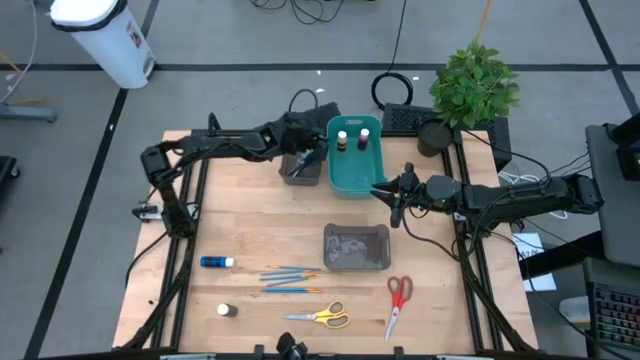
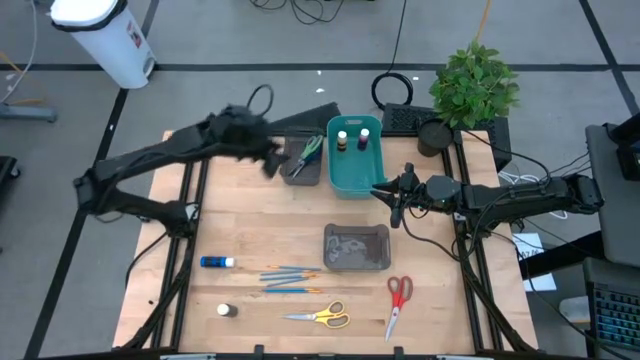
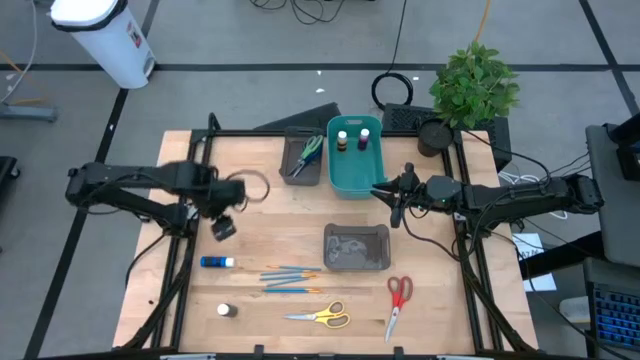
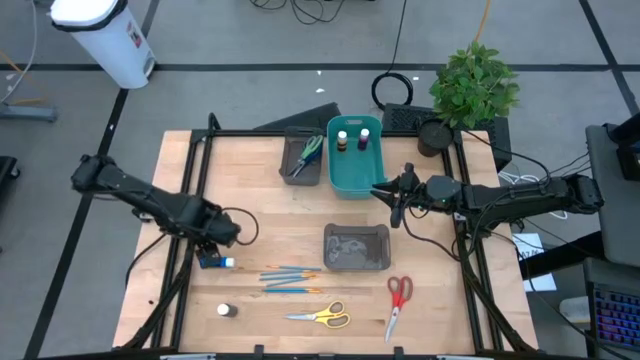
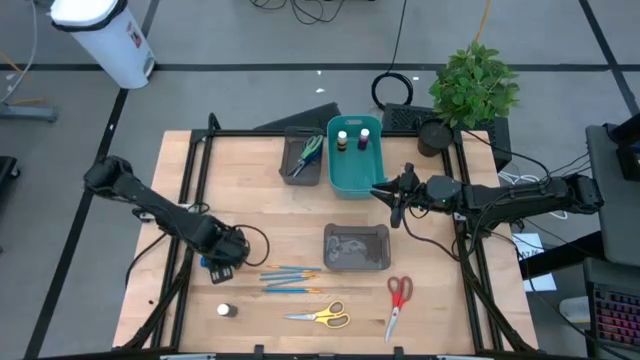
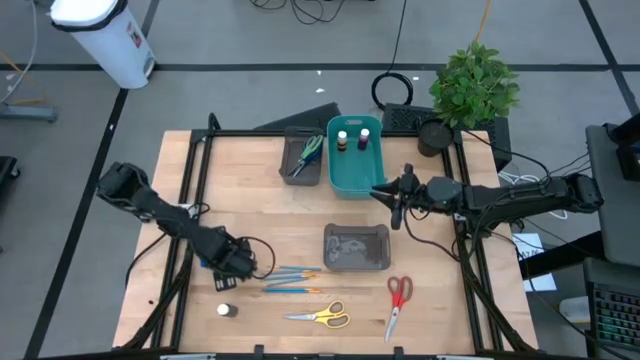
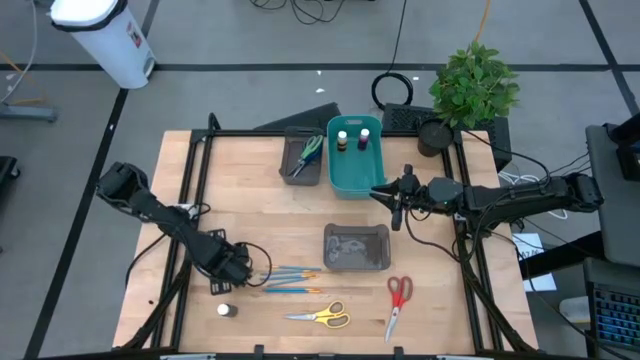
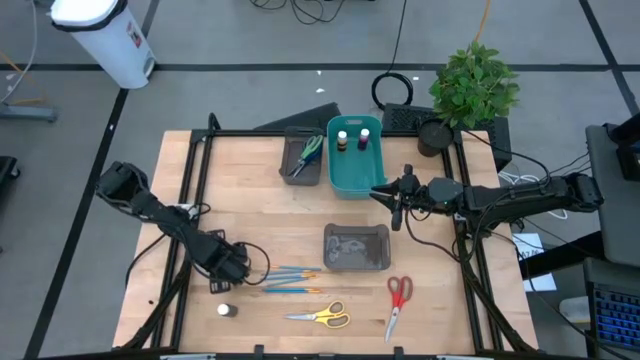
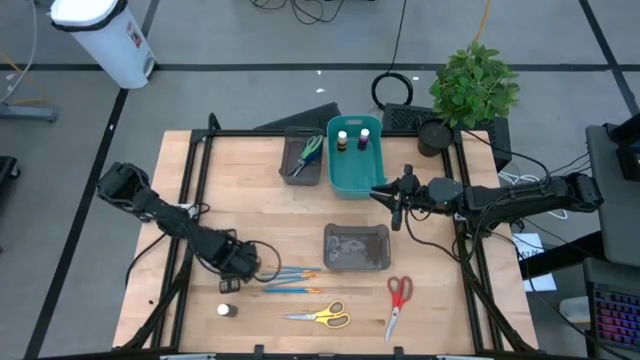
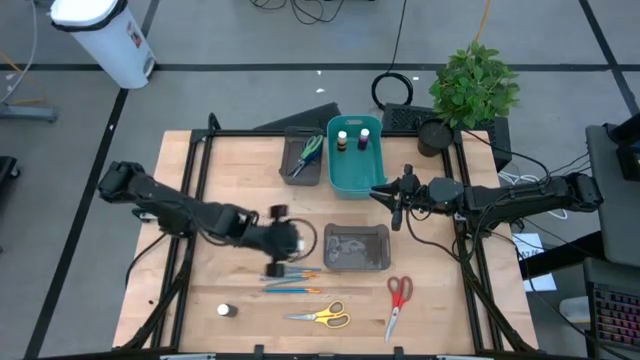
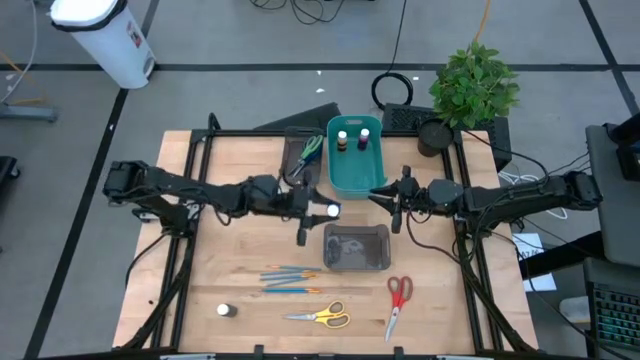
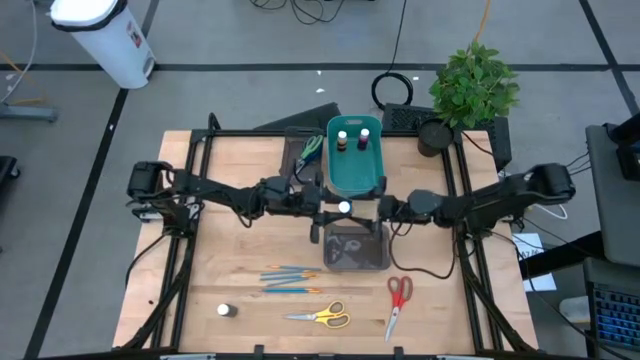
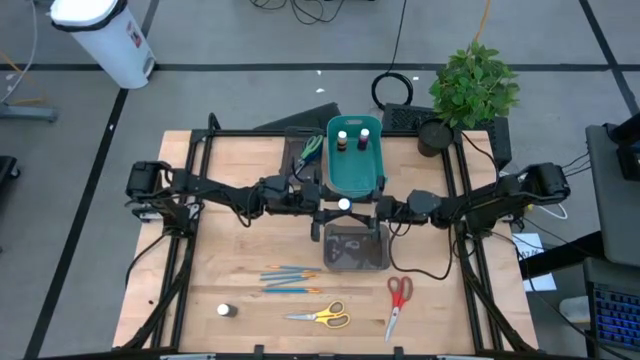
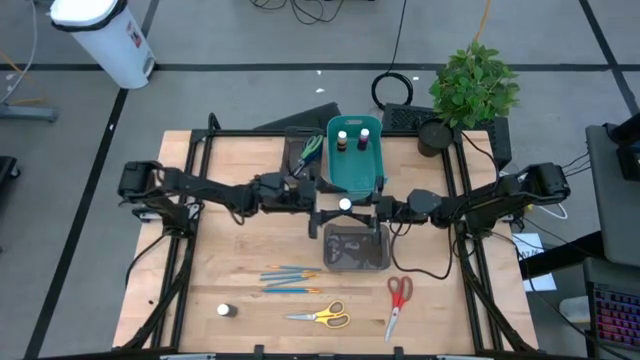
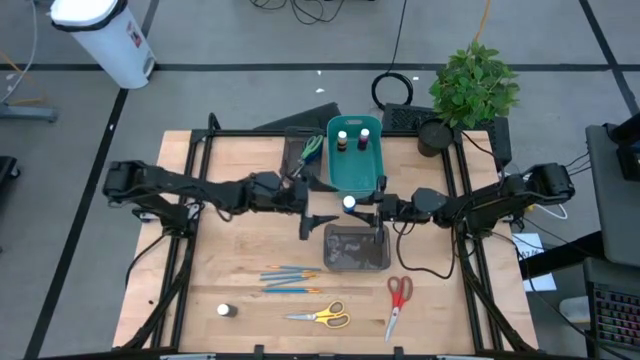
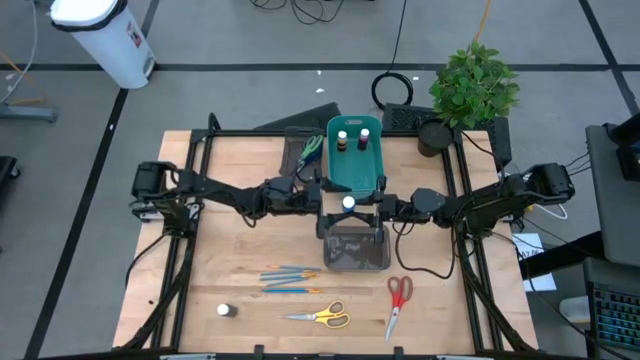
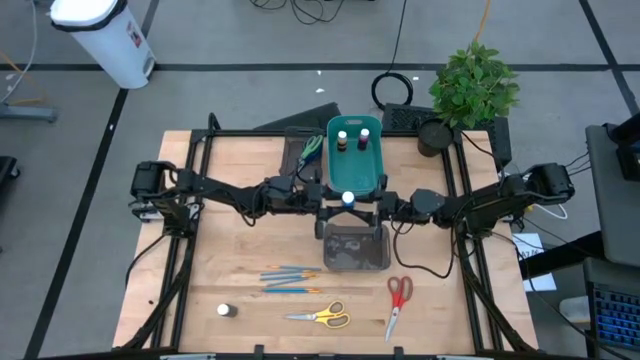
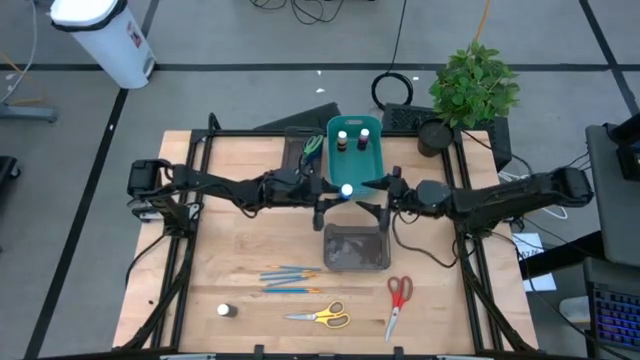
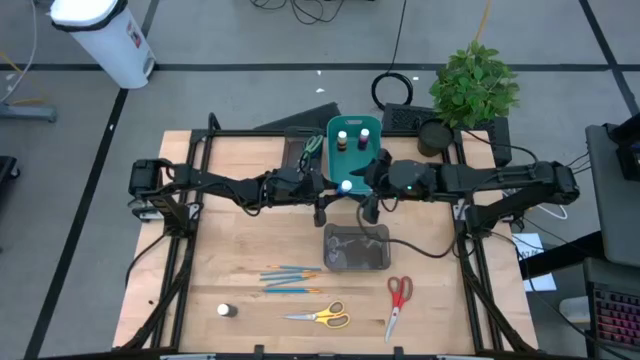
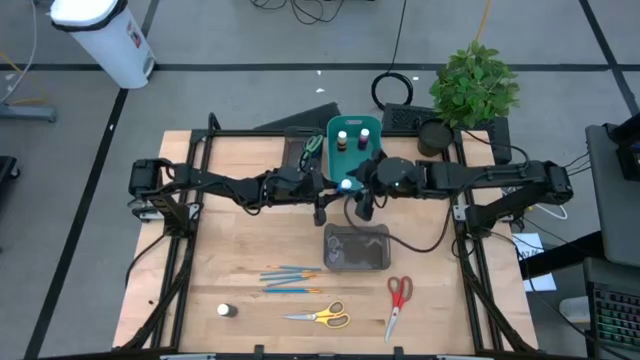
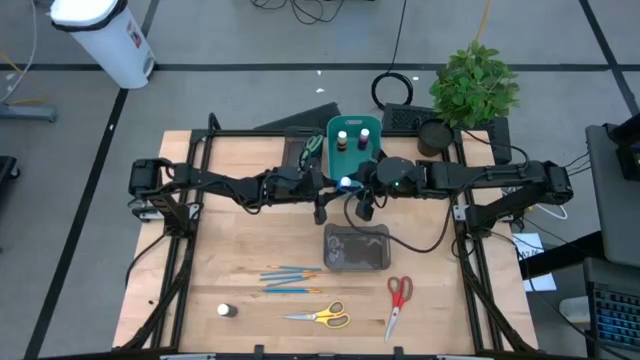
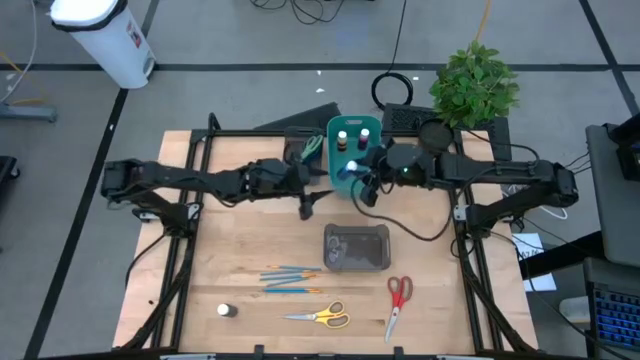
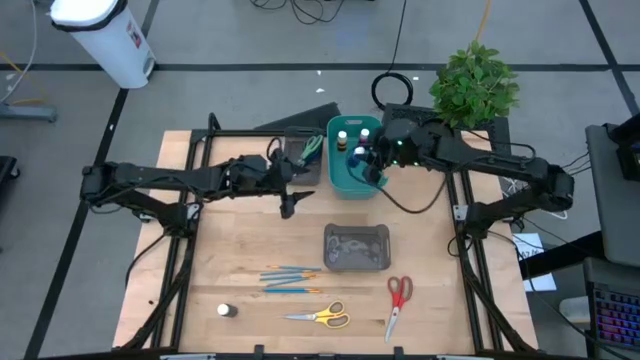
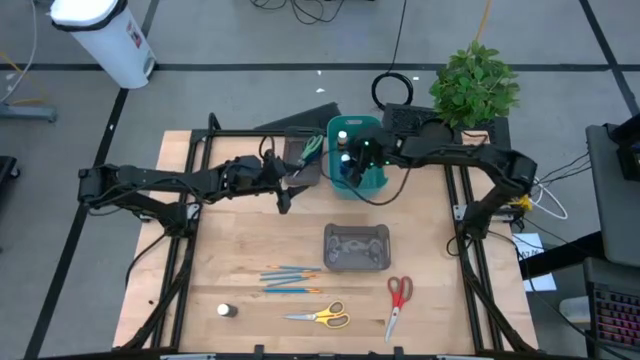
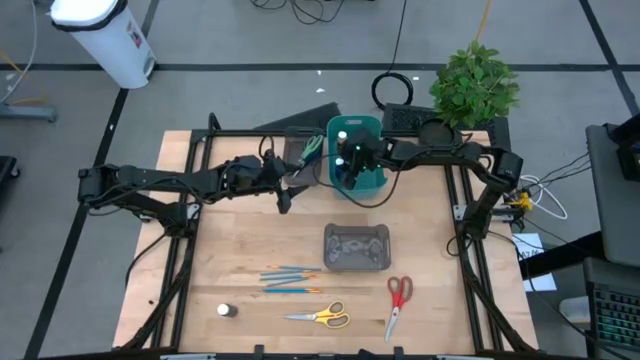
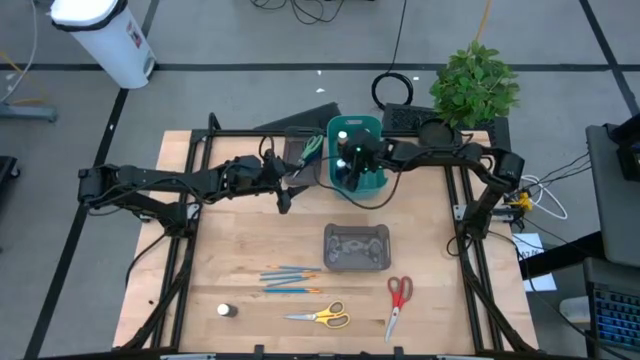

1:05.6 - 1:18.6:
Task: Pick & Place Paint Supplies
Put the blue paint bottle into the green bin

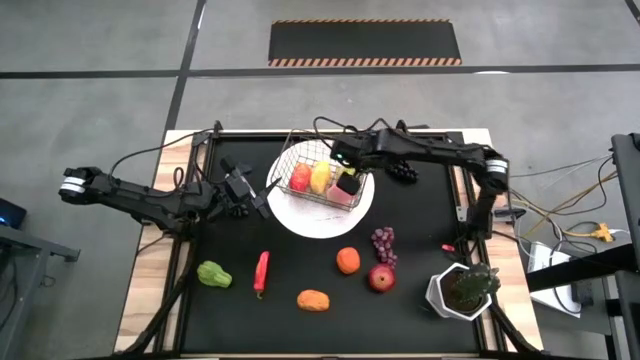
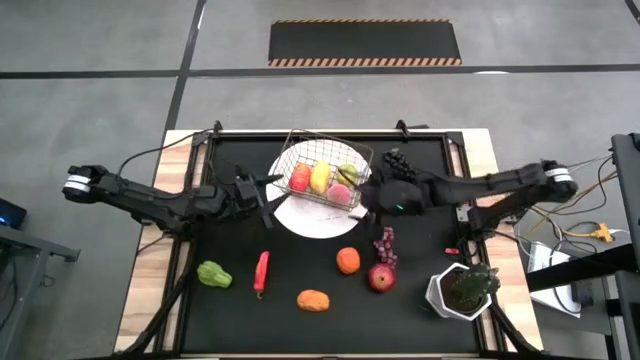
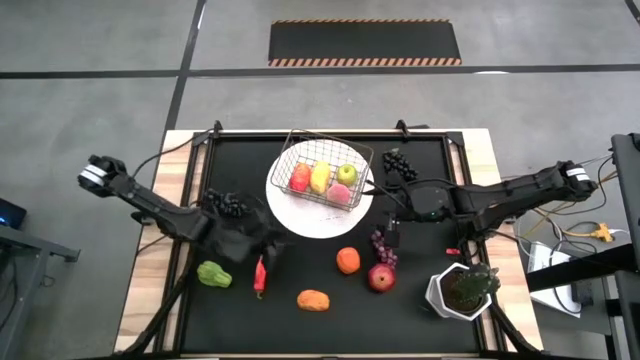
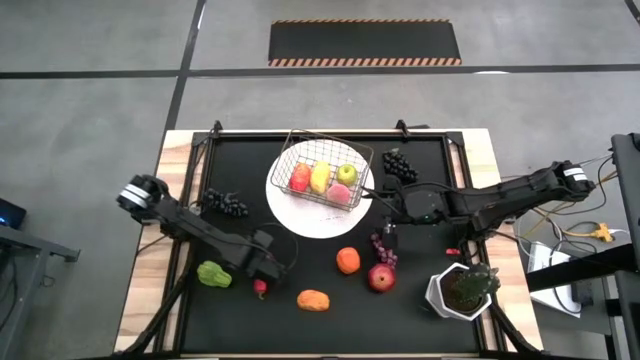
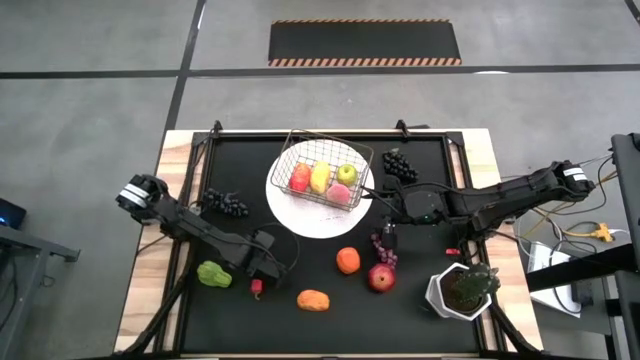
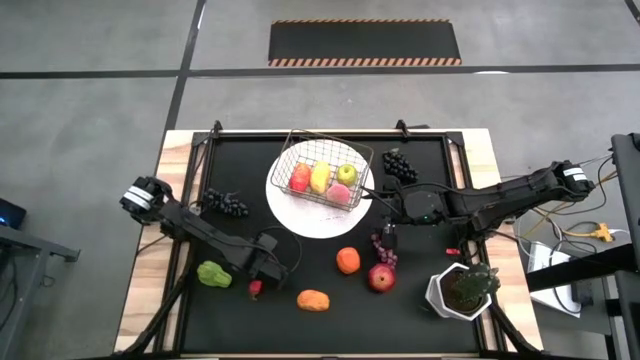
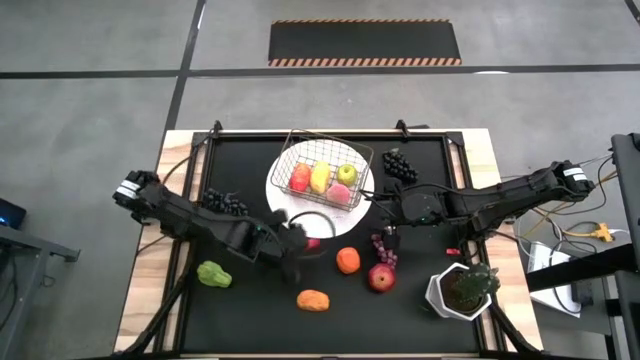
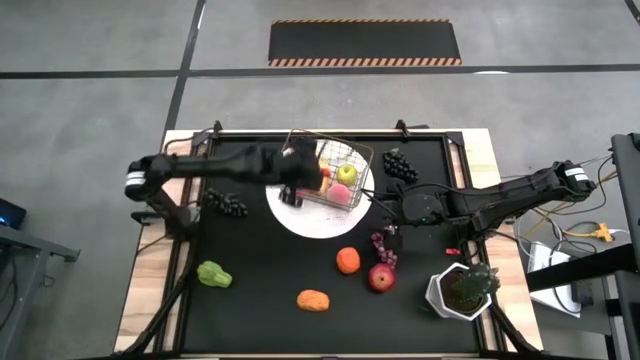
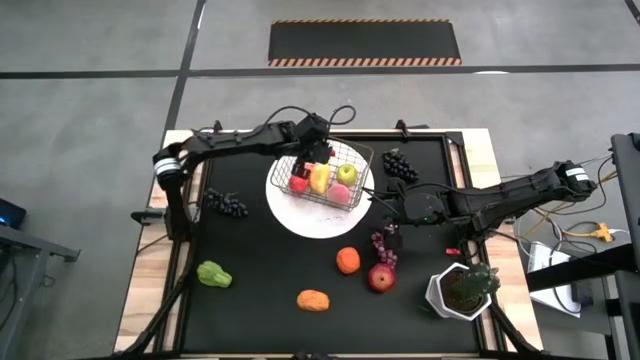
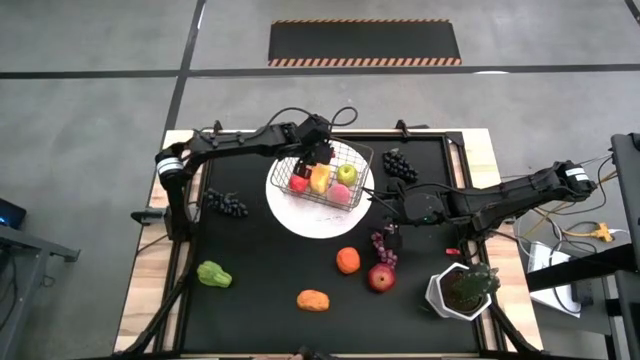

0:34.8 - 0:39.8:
Task: Build produce basket
Put the red pepper into the silver basket
